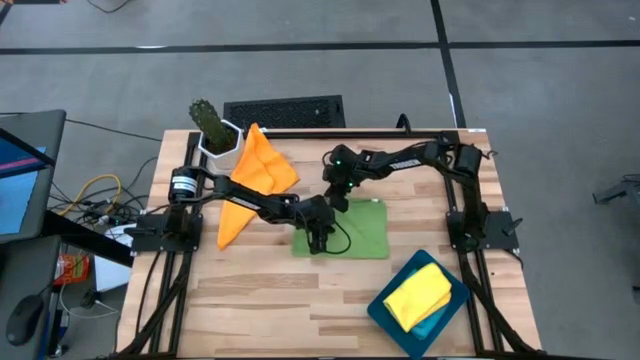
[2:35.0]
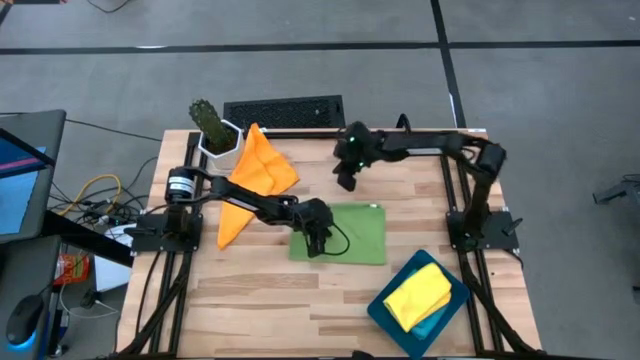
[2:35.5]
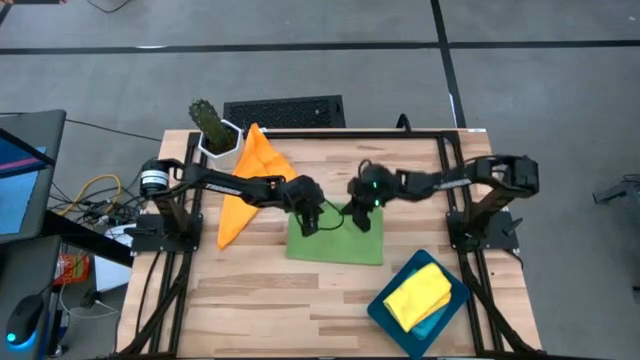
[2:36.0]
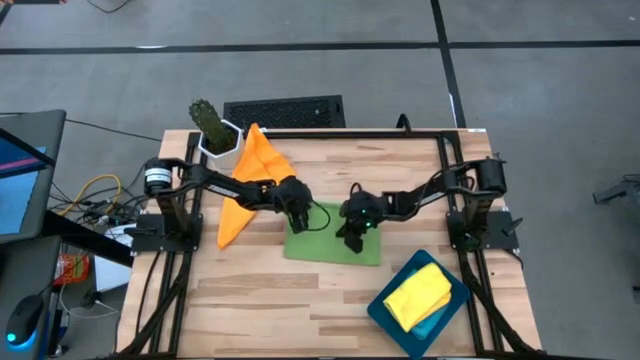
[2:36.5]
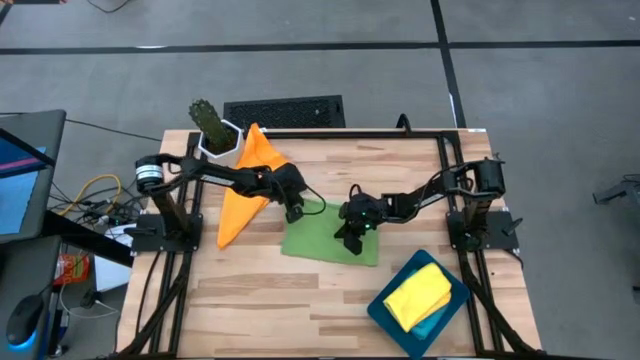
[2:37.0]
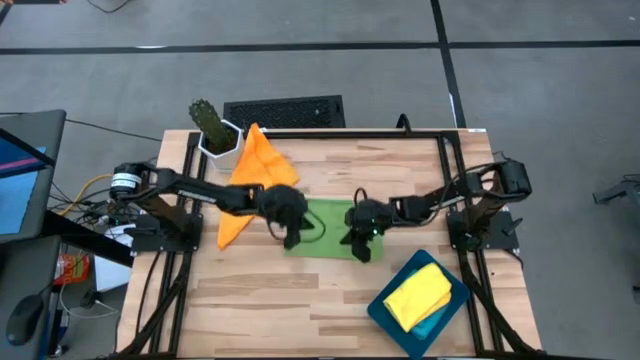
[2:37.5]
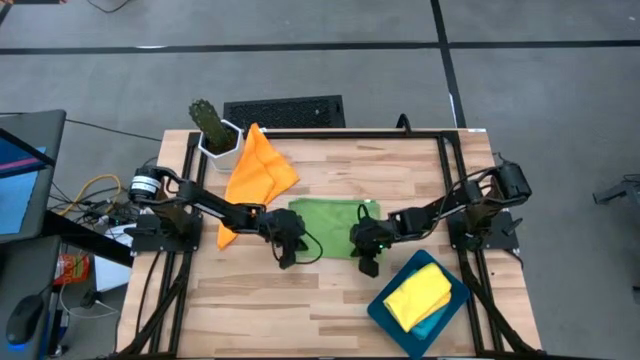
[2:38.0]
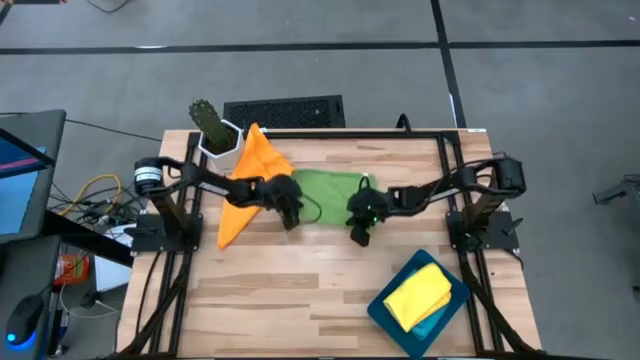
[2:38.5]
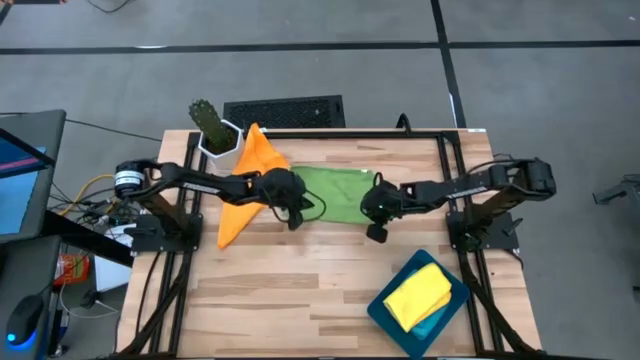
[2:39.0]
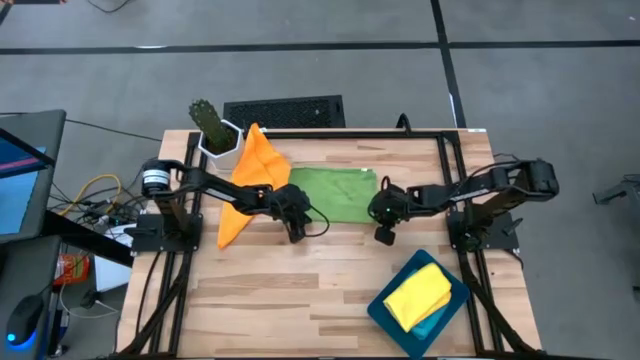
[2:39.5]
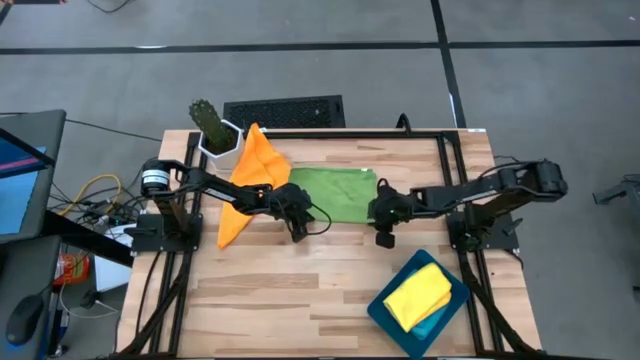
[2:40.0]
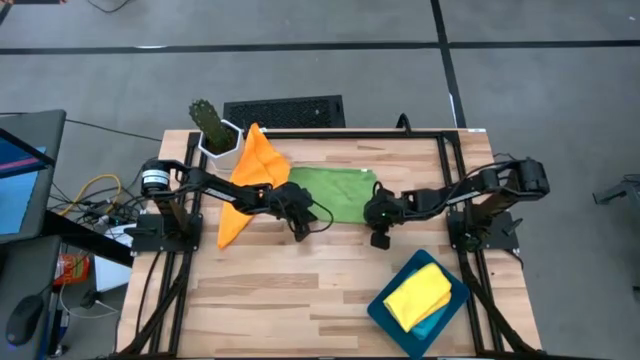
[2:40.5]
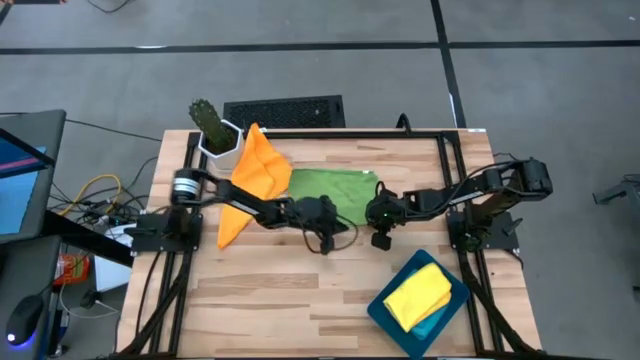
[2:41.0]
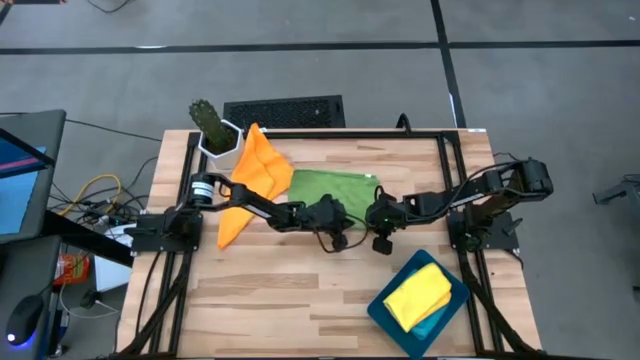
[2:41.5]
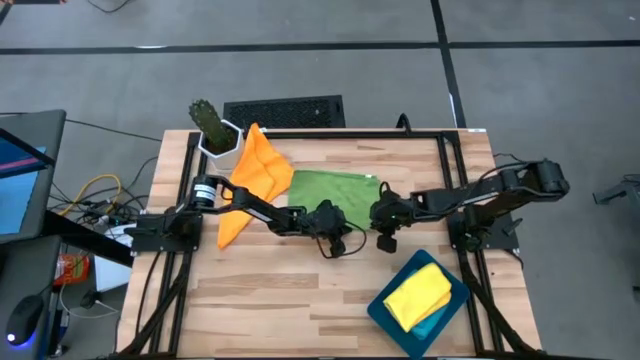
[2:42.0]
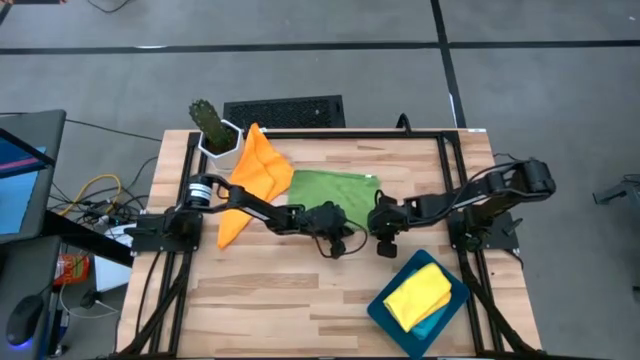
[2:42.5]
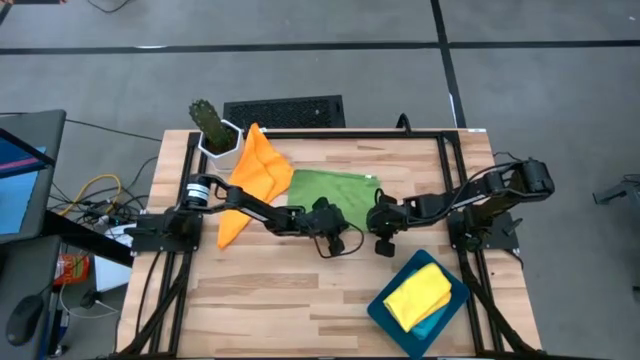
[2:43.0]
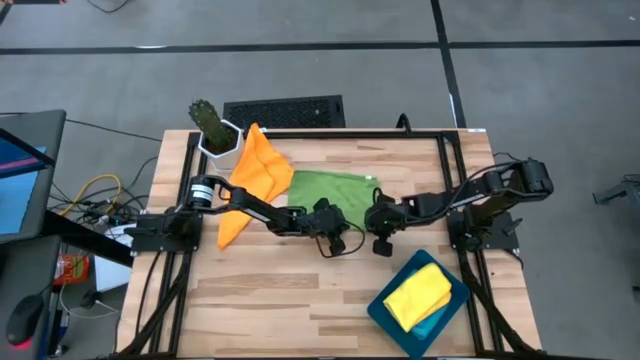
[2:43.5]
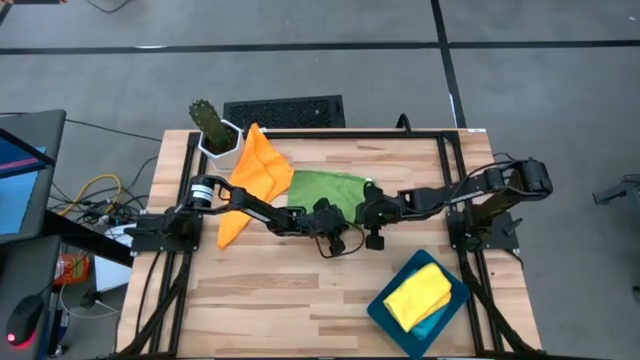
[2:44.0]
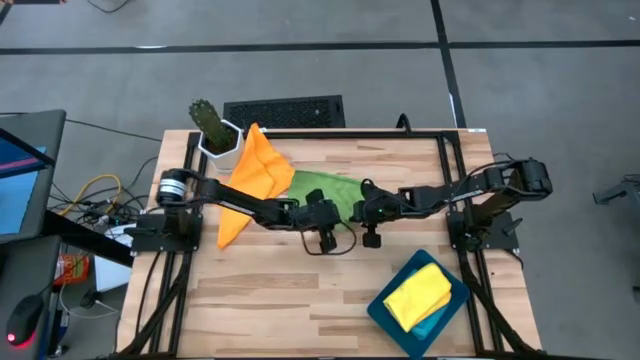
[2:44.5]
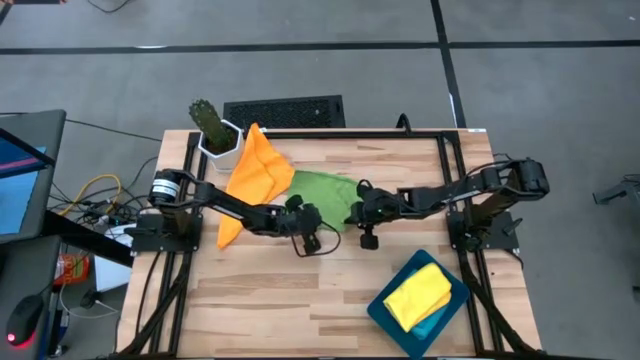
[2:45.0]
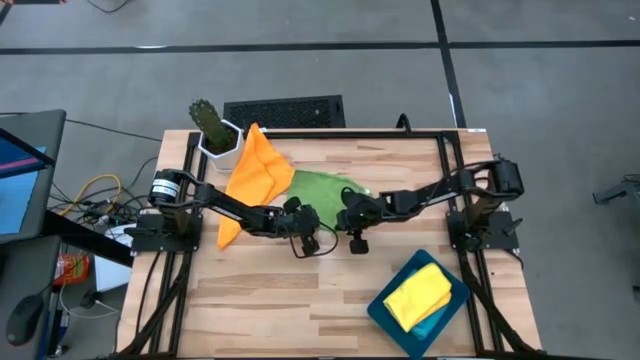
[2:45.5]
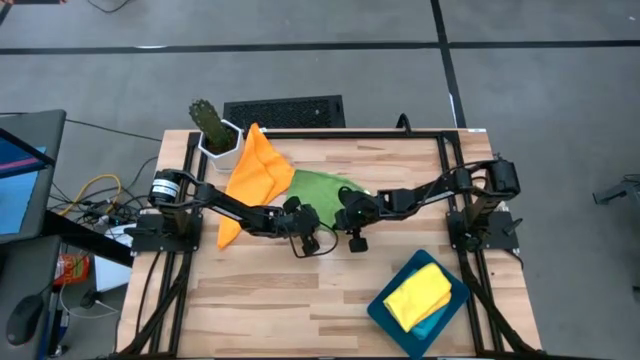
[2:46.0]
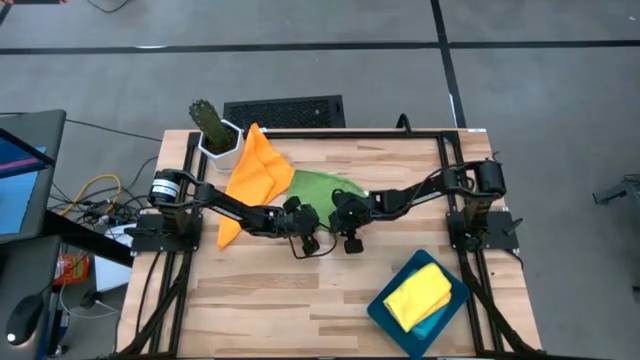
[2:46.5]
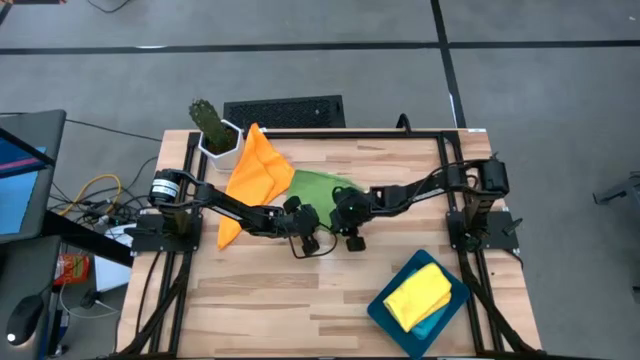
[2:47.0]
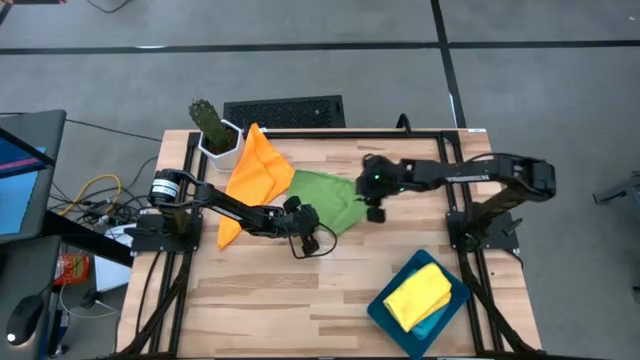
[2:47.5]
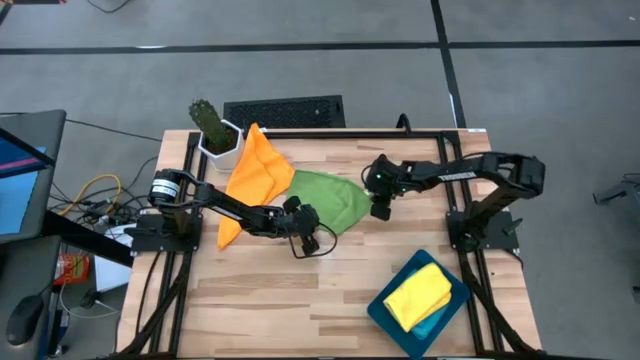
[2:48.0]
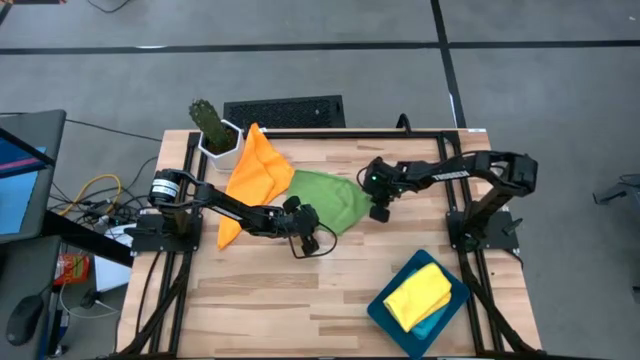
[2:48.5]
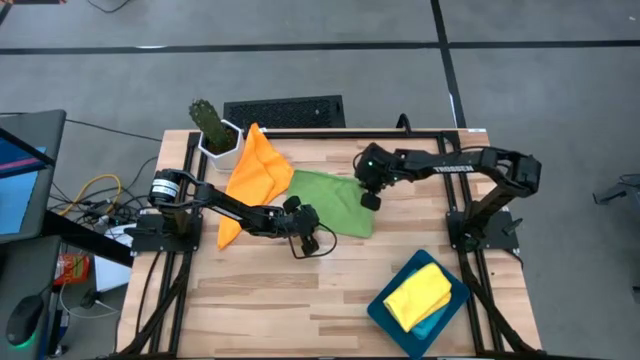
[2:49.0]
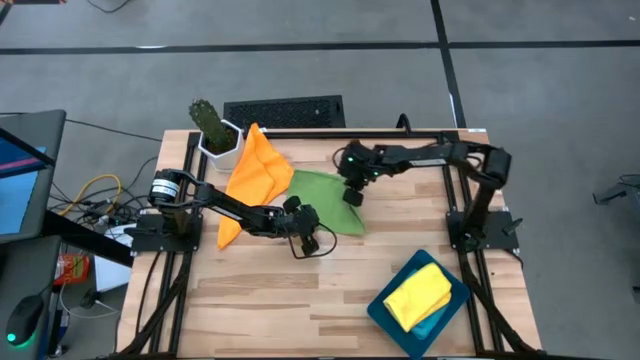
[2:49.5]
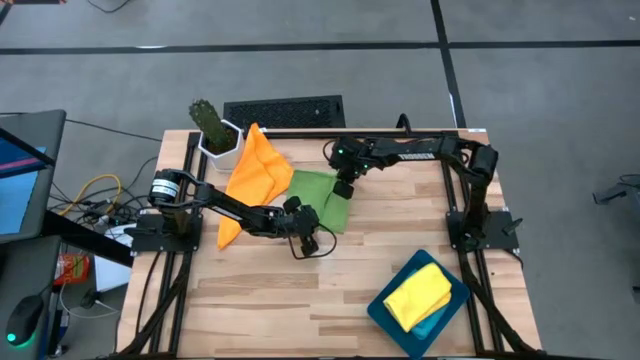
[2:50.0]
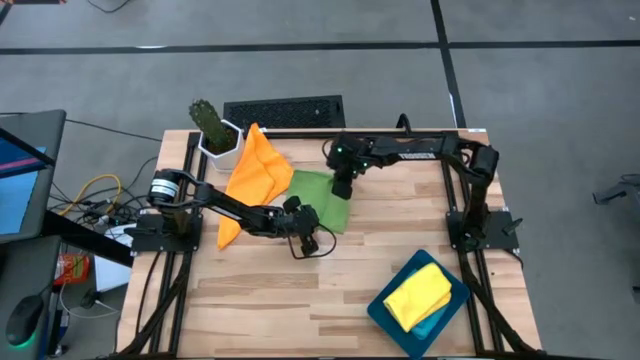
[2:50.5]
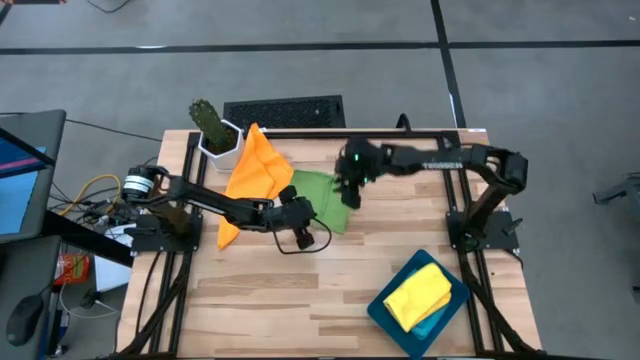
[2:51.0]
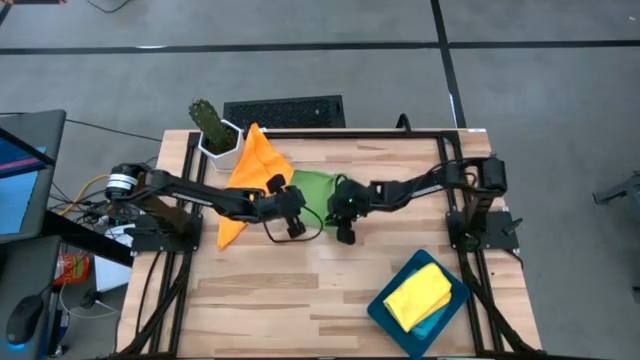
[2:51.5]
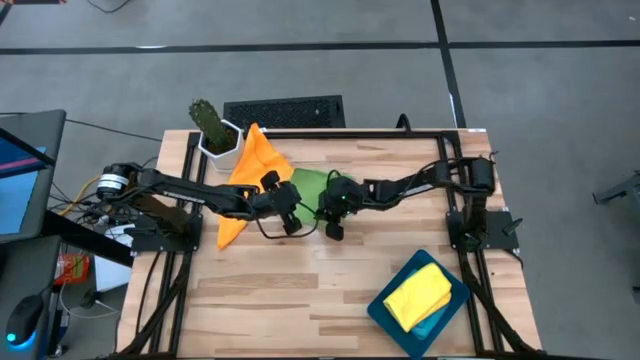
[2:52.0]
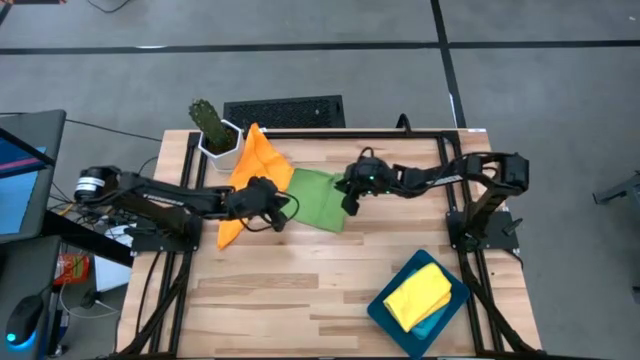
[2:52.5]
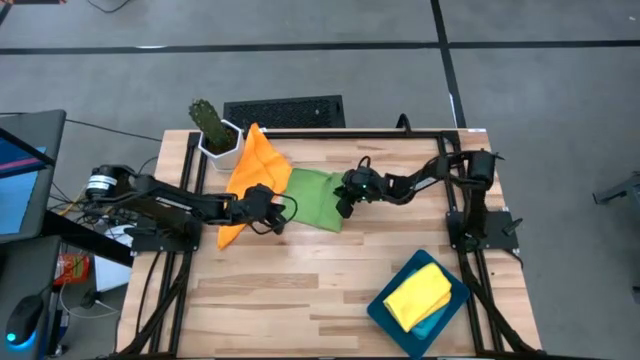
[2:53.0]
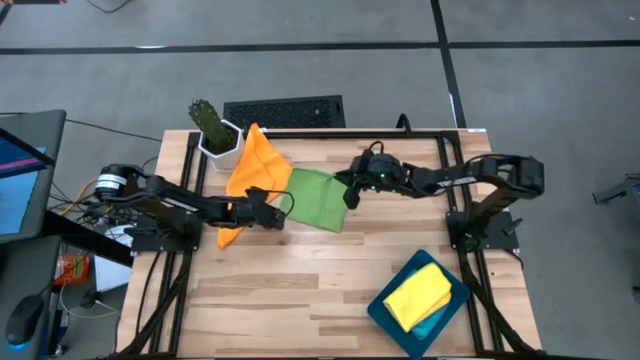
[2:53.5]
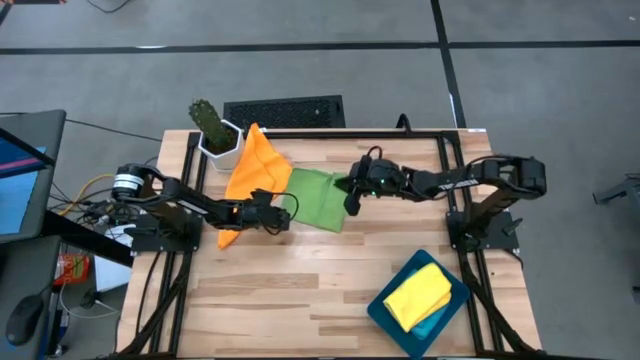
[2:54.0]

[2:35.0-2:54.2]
Task: Fold microfiber towels
Fold the green microfiber towel

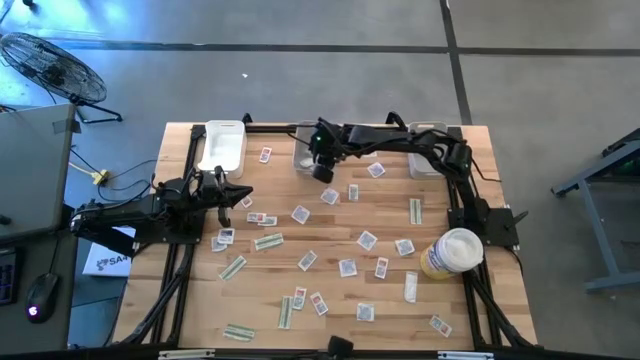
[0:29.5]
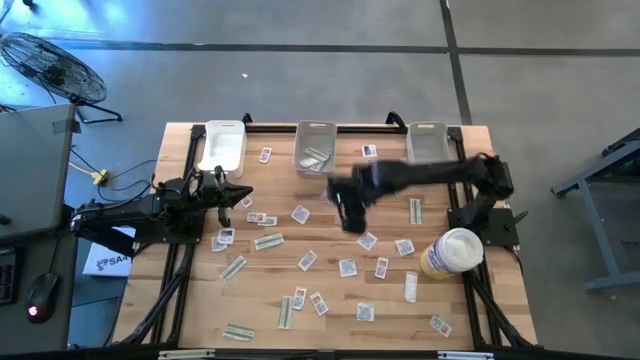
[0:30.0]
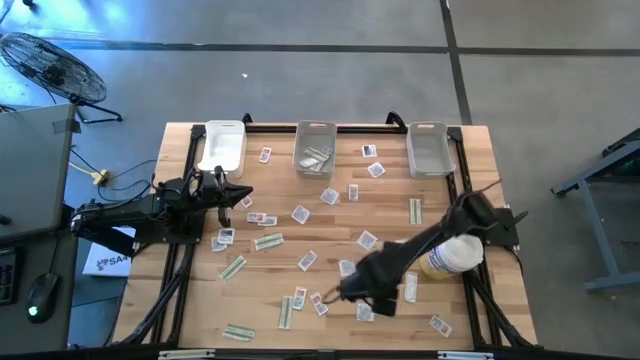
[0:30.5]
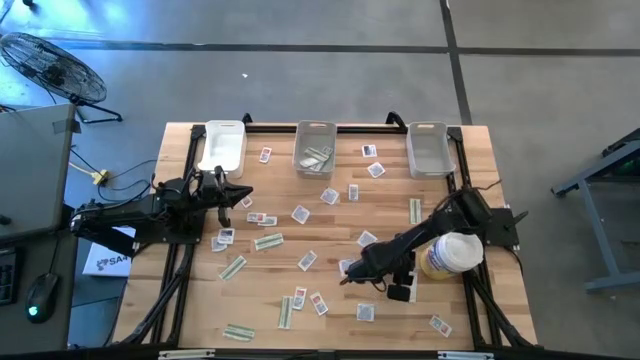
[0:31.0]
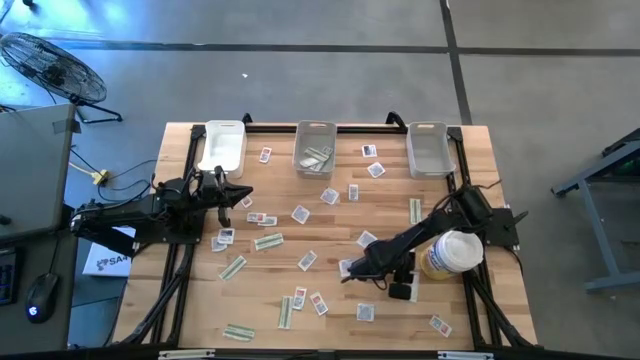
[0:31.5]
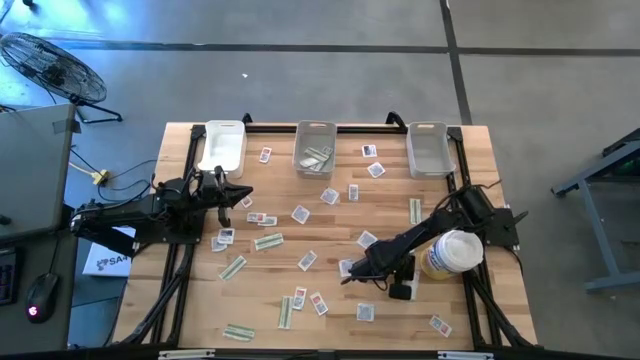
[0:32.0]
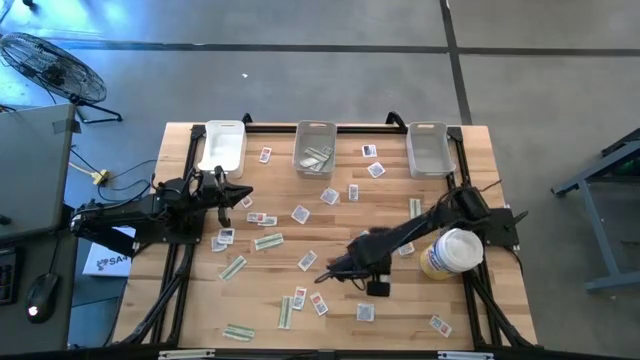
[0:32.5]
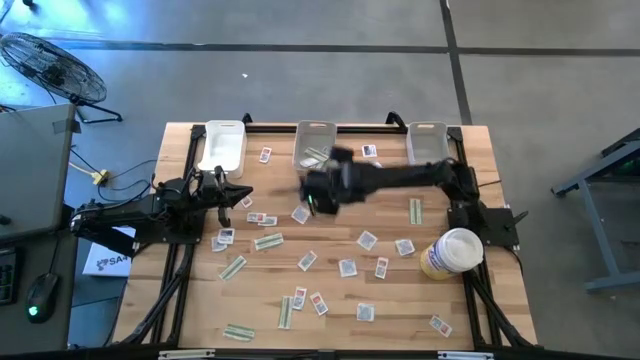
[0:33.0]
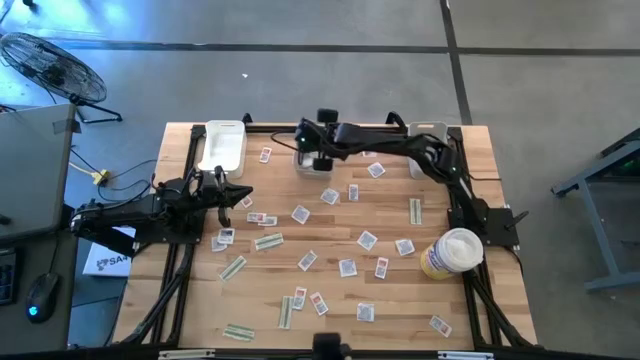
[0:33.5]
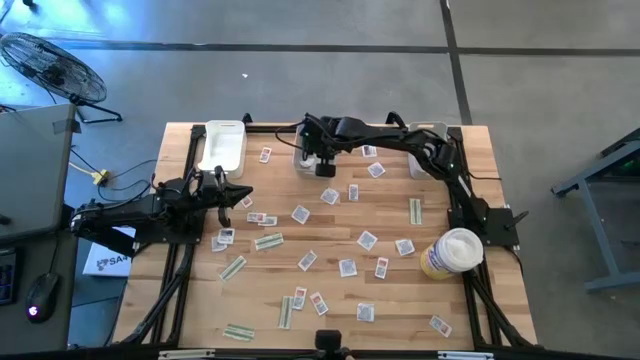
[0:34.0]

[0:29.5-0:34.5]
Task: Pick & Place First Aid Supplies
Put the green pad into the left gray bin
